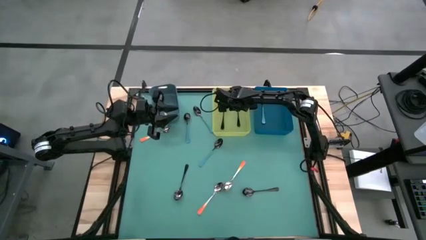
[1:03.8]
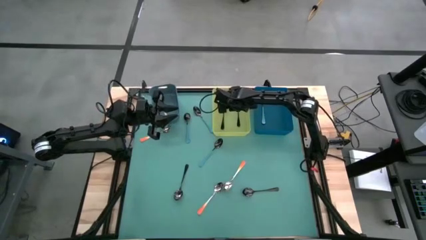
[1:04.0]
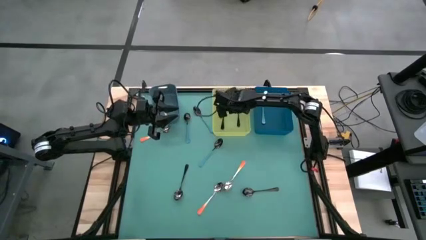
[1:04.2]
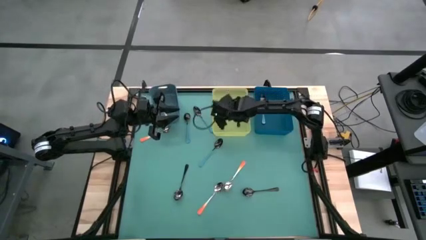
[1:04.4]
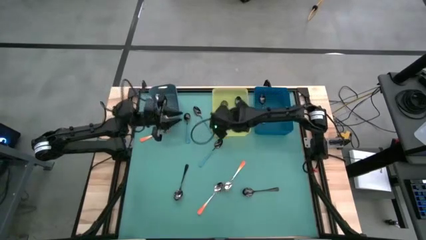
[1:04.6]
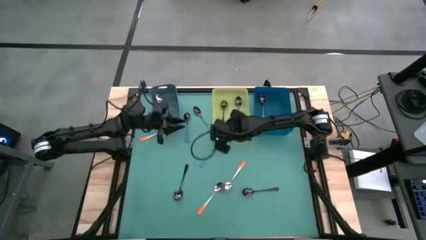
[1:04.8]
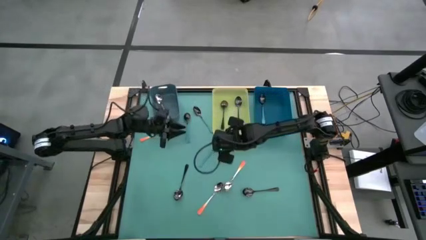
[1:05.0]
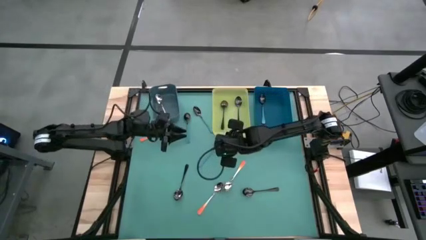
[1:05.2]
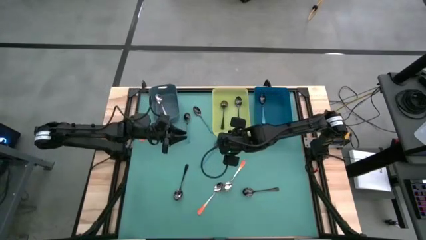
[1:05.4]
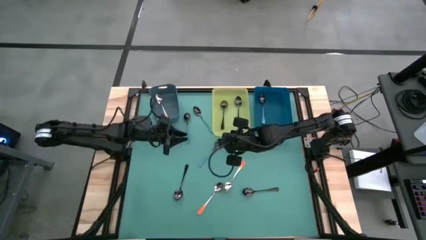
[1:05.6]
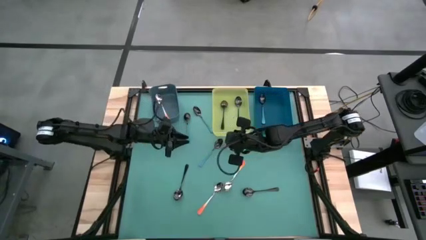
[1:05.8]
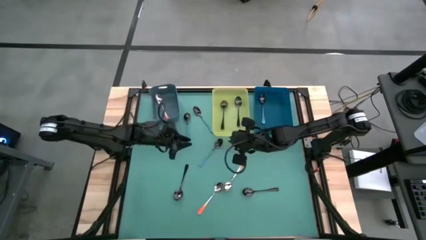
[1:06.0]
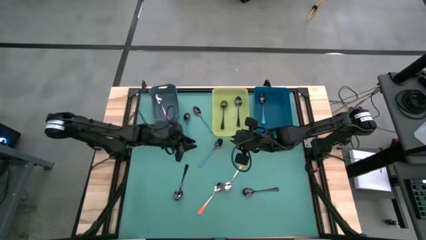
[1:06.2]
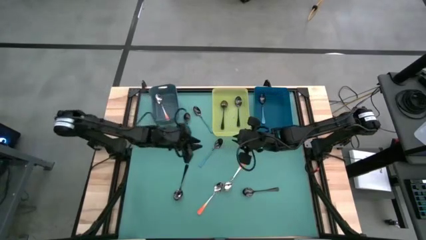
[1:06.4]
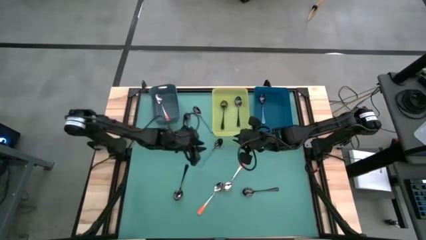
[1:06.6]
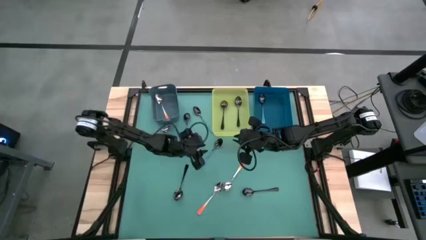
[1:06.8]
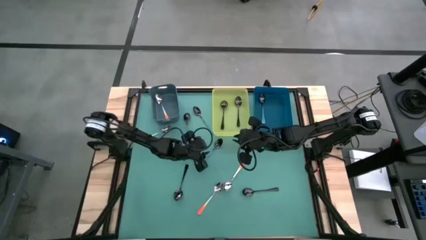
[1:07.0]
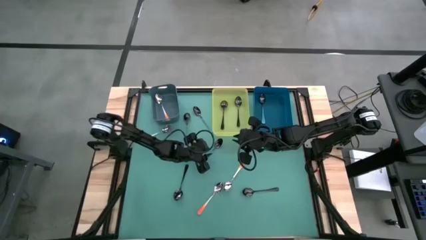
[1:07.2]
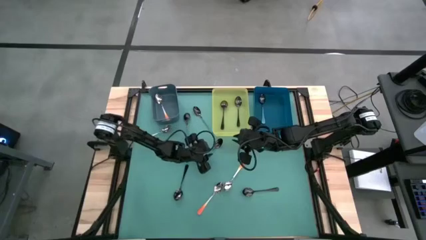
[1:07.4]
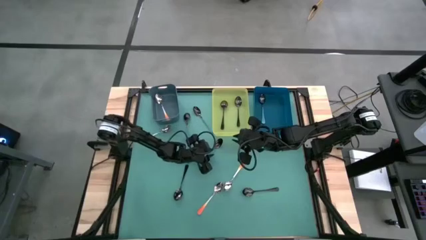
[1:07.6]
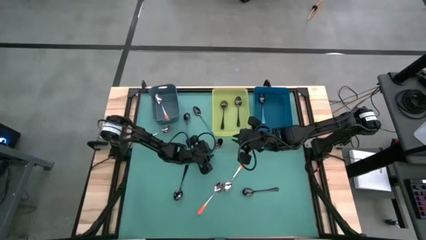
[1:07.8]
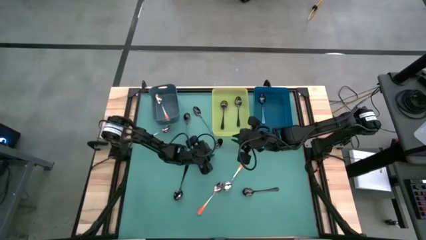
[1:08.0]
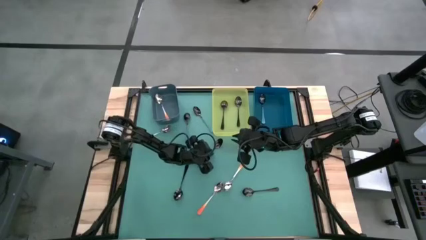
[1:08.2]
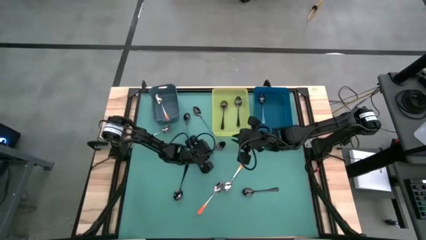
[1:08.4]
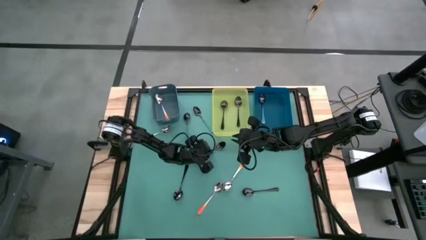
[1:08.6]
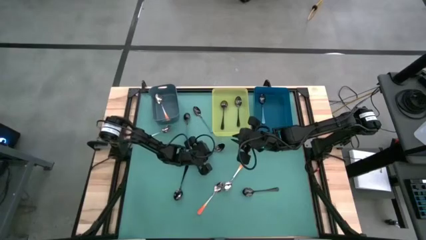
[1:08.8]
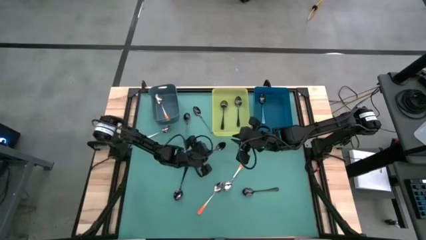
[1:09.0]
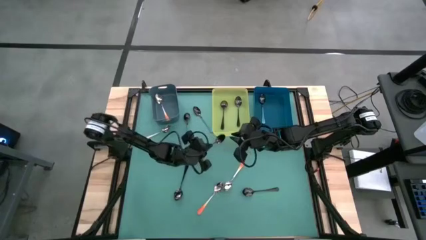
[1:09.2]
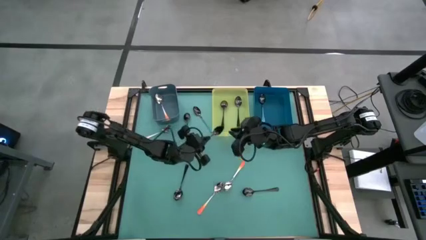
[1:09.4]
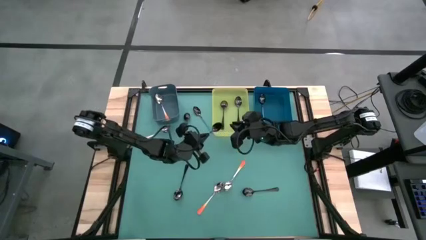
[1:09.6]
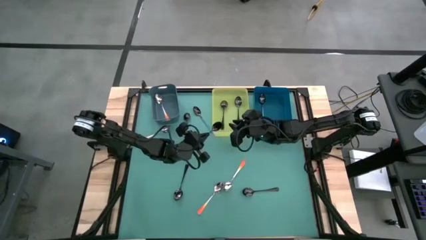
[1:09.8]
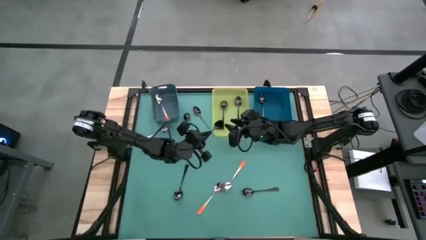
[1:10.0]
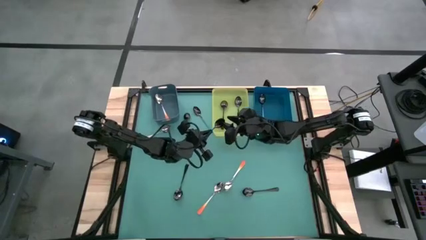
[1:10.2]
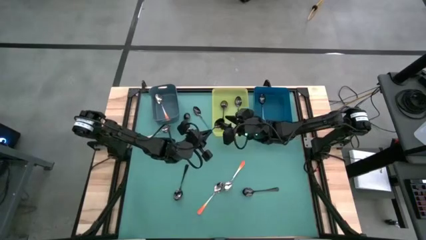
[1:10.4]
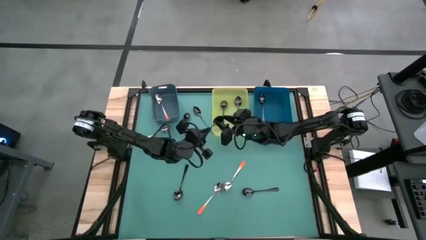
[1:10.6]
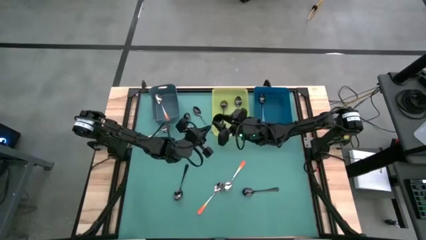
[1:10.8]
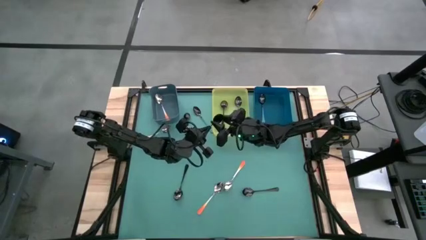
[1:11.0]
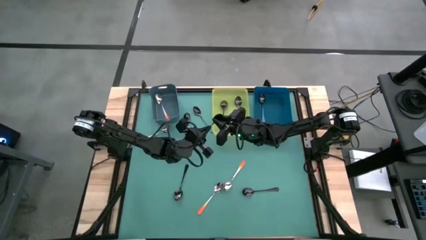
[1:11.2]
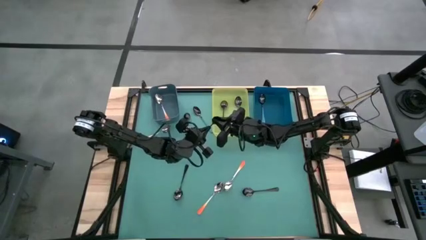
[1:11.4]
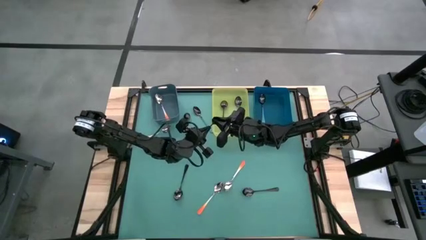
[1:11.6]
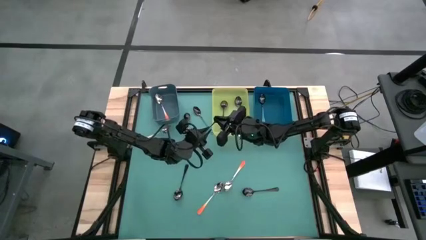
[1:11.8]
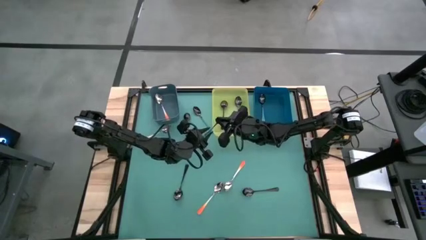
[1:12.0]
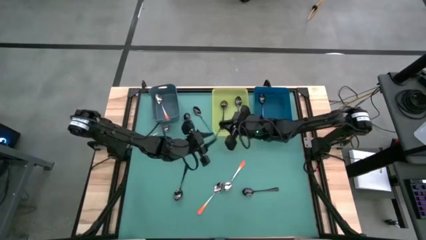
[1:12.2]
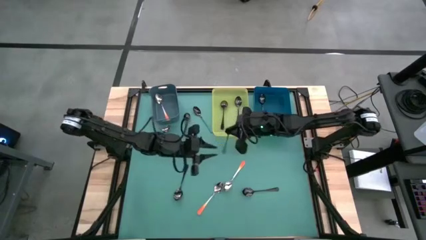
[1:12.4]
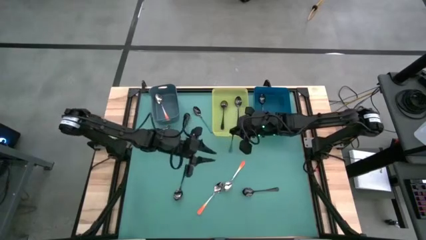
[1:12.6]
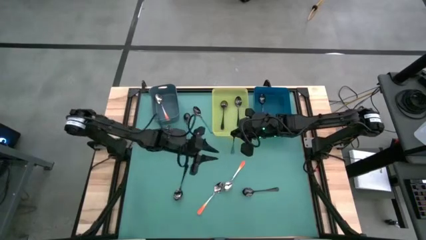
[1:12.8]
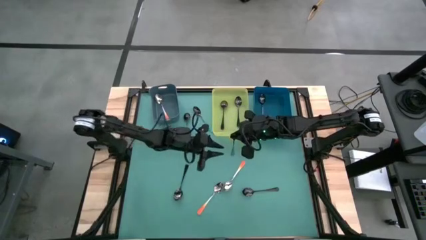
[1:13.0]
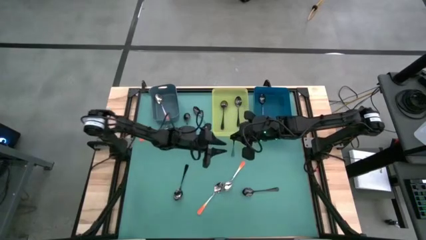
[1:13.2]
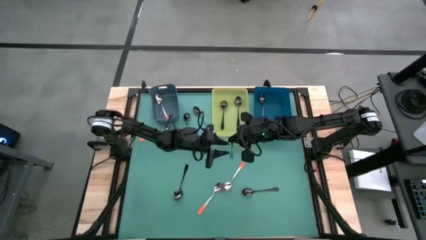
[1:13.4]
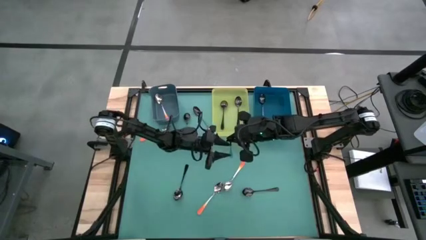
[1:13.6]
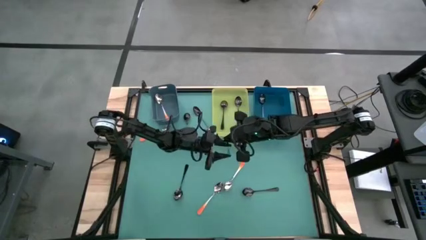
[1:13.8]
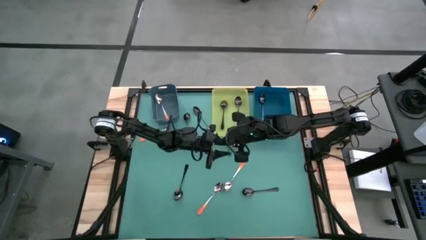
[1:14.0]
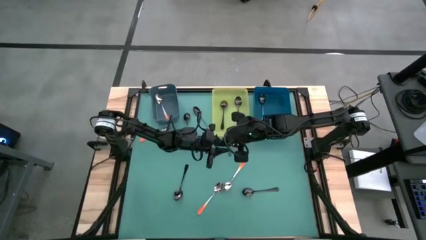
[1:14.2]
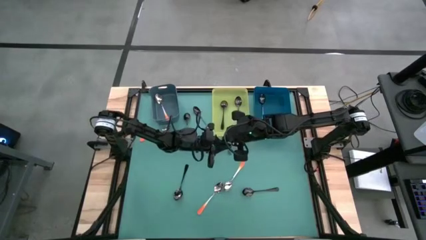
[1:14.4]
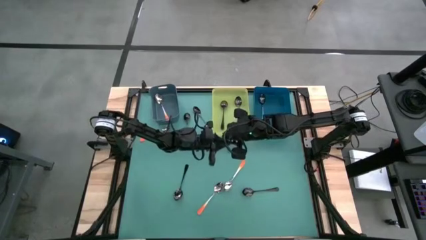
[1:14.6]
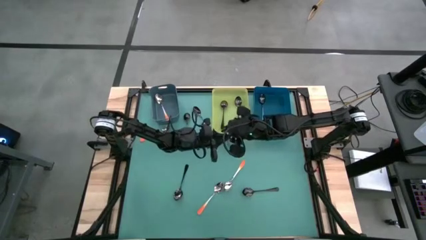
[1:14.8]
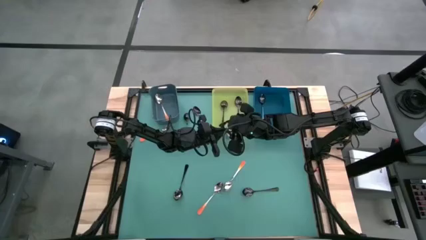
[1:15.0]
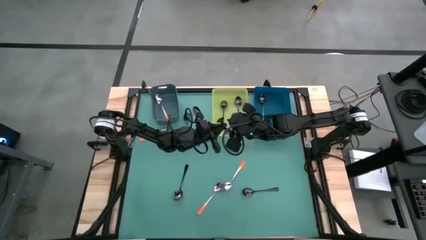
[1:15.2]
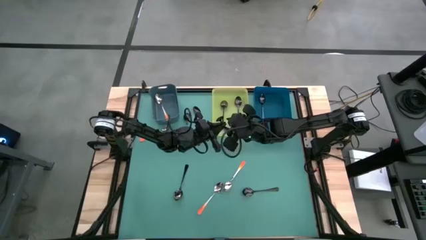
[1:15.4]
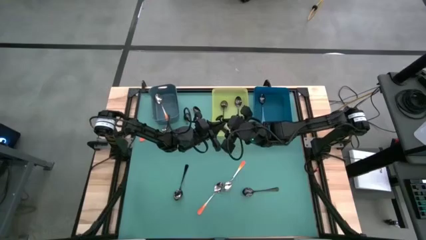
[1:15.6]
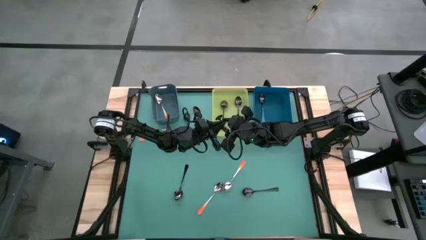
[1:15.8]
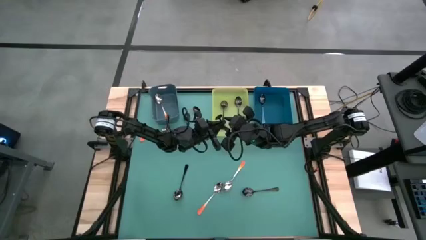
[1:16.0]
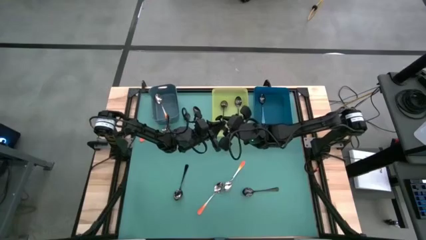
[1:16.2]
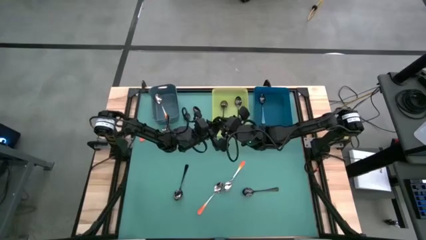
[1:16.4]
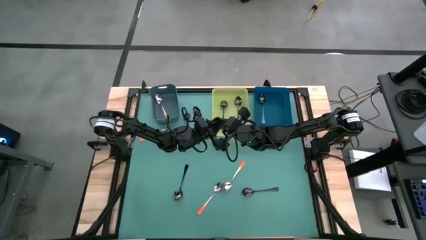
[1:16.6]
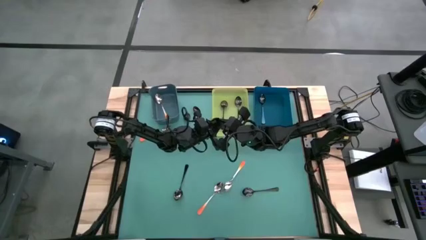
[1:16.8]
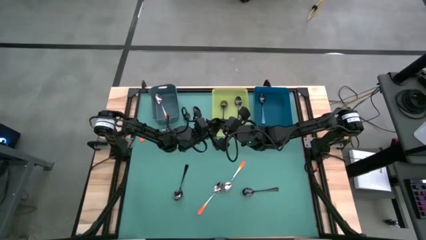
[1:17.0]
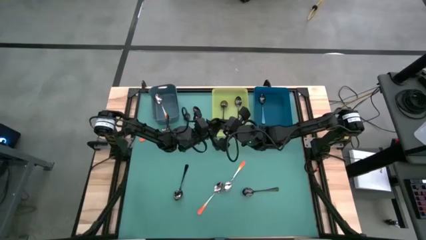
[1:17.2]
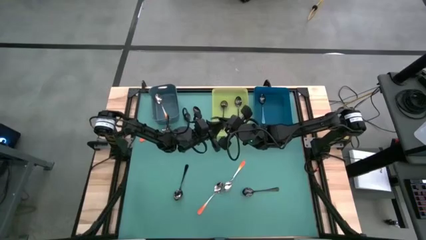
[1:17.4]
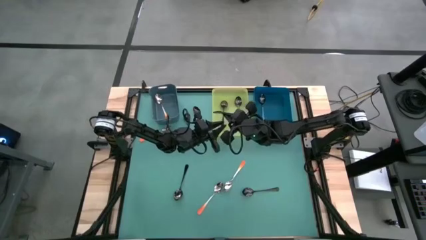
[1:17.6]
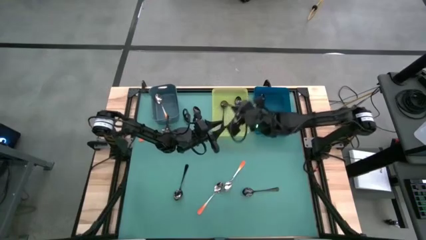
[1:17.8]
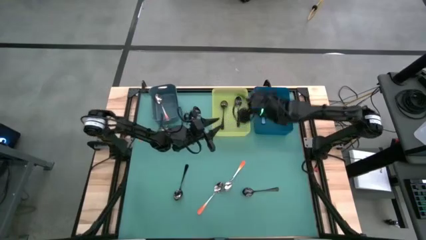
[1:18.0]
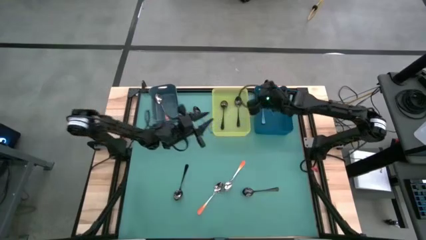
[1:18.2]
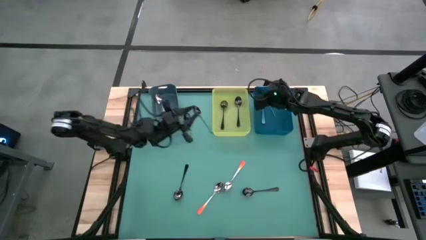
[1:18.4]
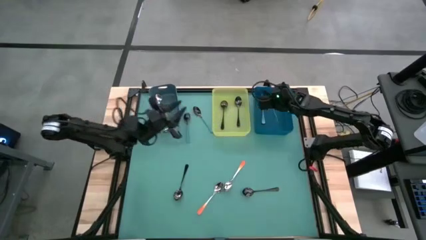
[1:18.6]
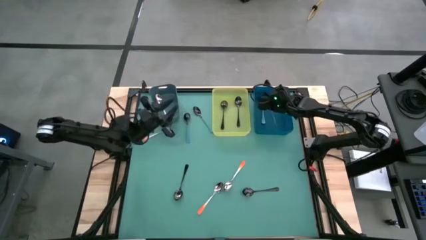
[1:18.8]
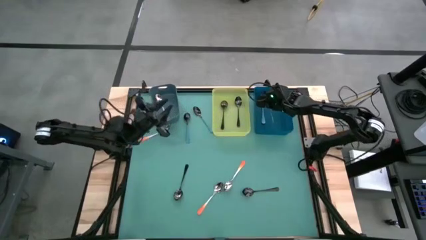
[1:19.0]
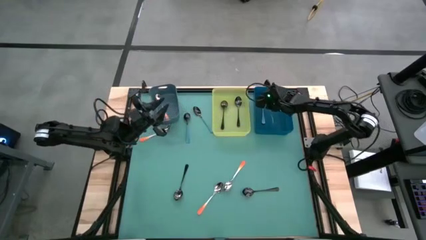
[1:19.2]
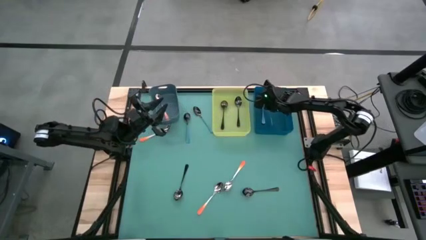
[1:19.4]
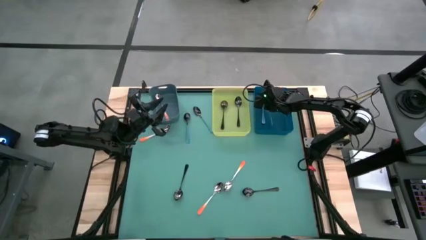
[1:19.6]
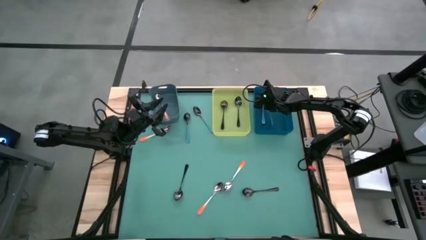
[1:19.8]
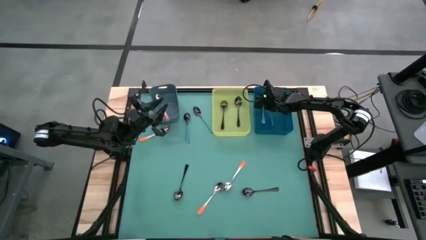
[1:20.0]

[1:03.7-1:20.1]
Task: Sort silverware by color (type)
Put the blue spoon into the blue bin
